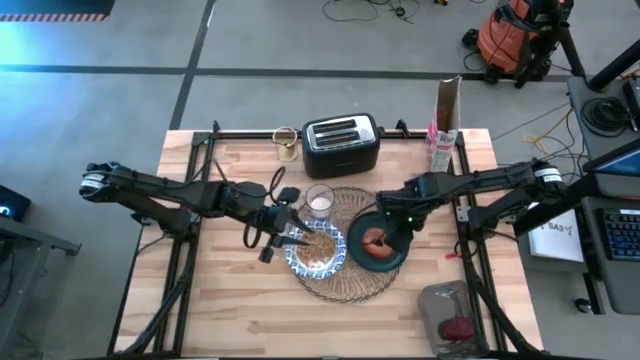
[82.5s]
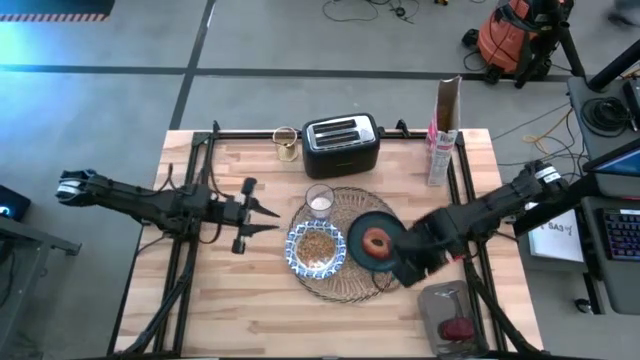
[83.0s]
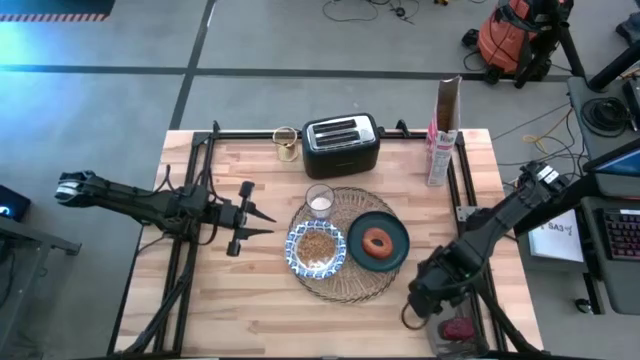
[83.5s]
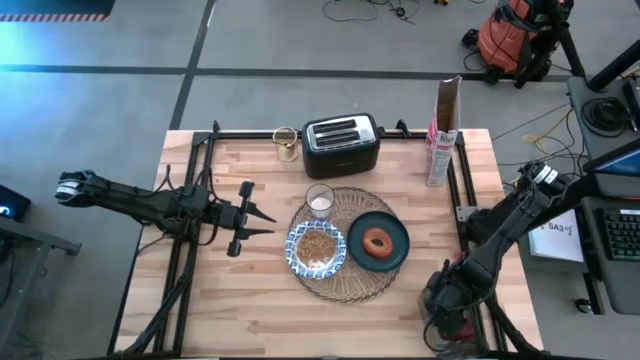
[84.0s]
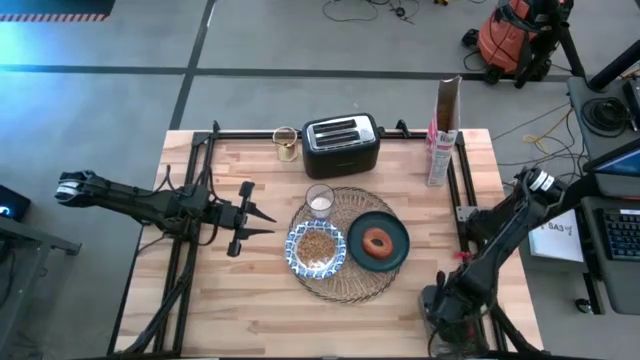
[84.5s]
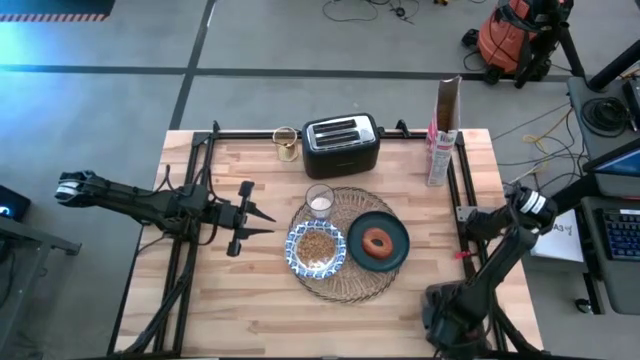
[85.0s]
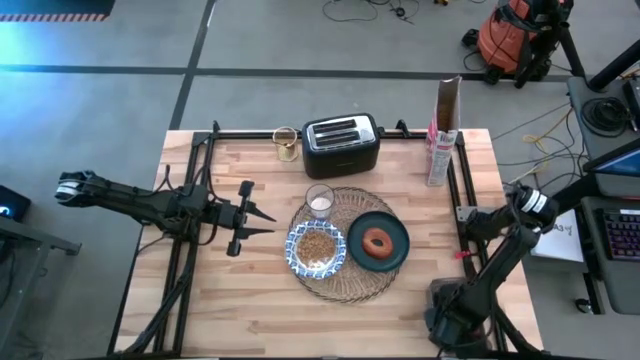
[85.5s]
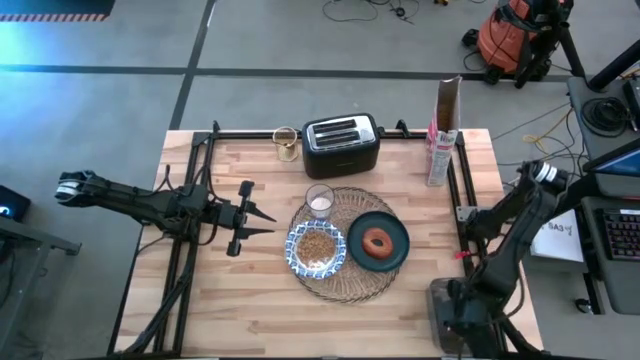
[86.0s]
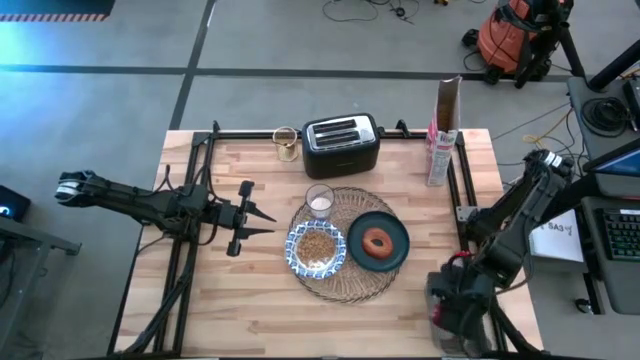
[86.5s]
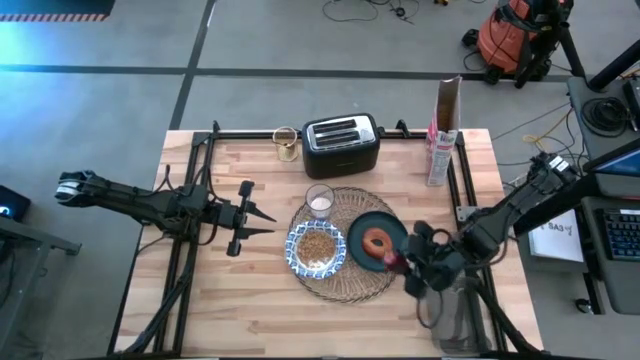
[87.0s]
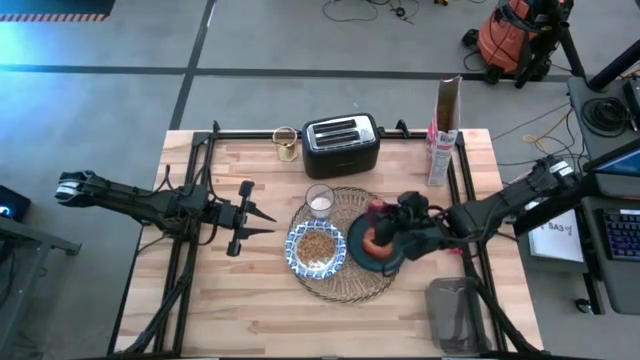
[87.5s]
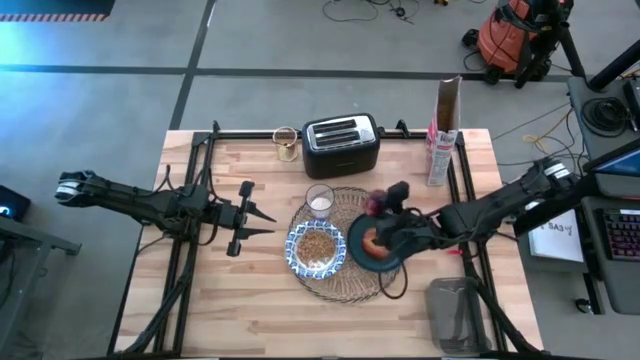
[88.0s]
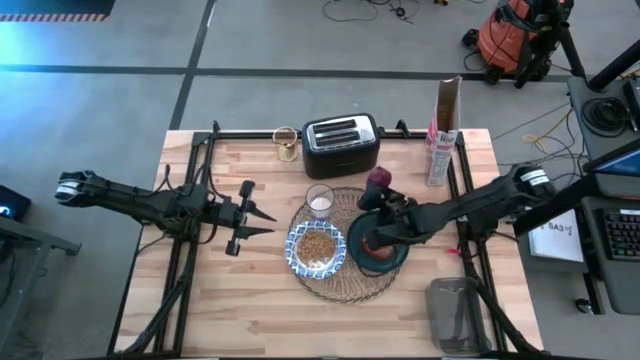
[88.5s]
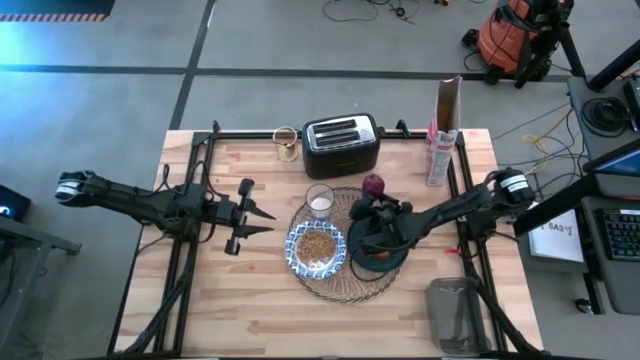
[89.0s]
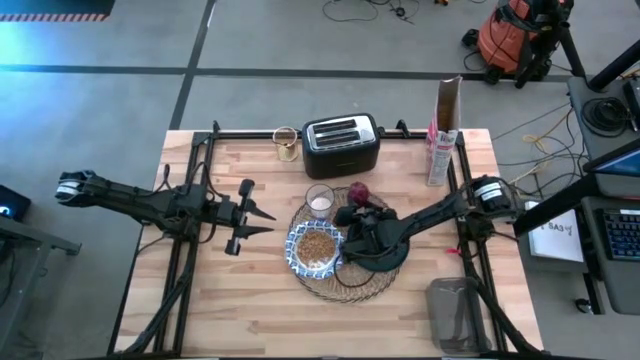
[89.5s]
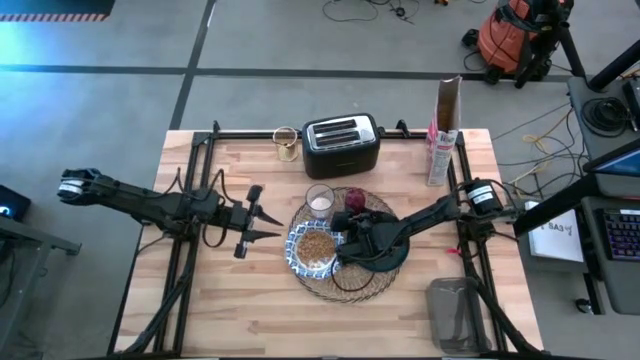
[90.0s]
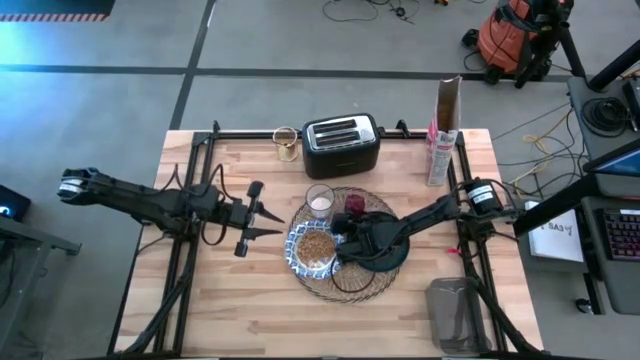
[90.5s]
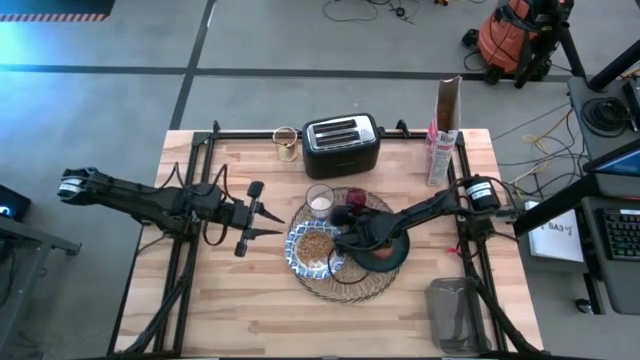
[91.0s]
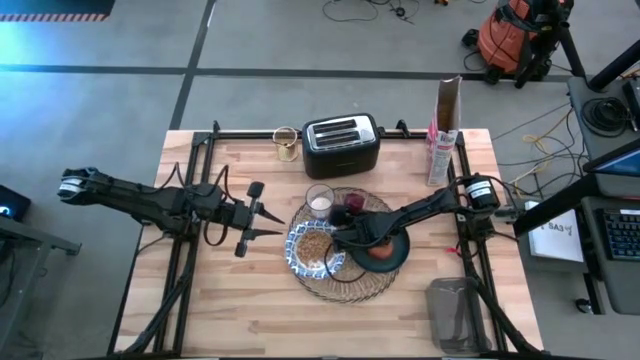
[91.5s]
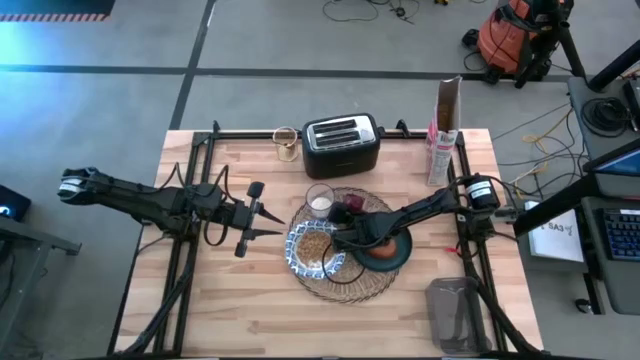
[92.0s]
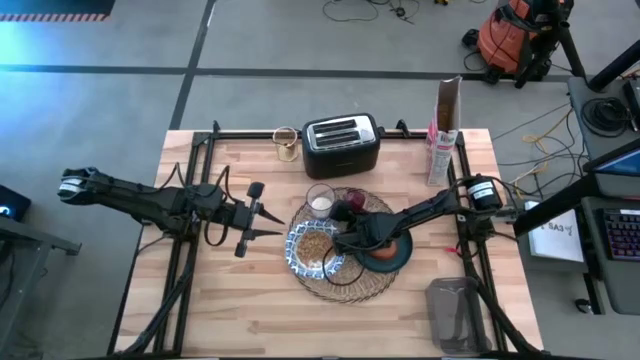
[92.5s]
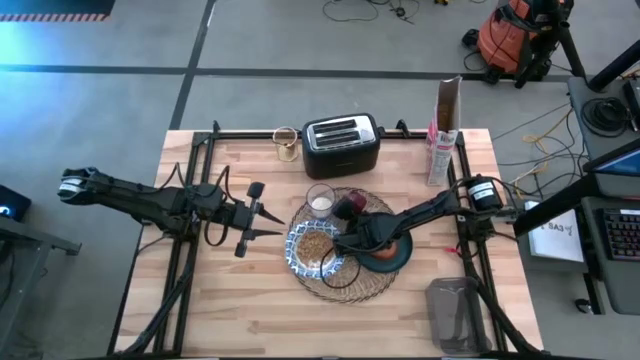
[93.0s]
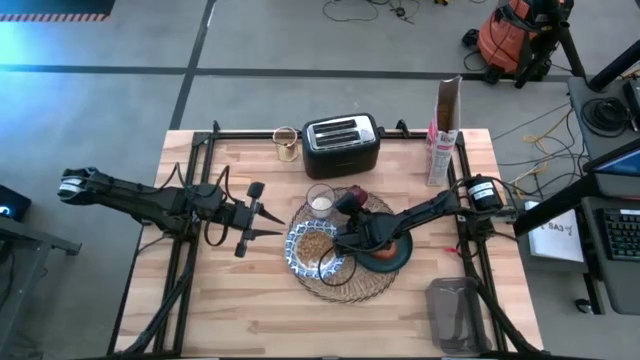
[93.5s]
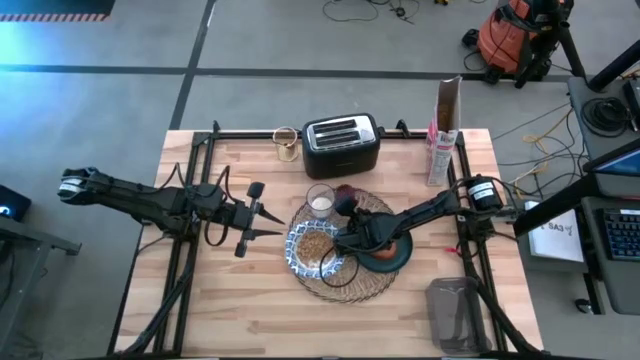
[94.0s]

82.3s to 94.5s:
Task: Arrange a breakfast setting
Put the apple on the top of the brown place mat
